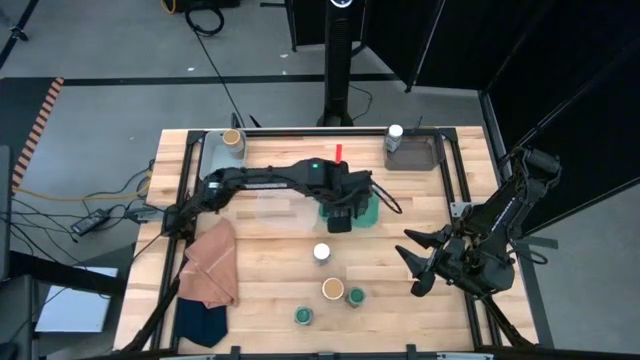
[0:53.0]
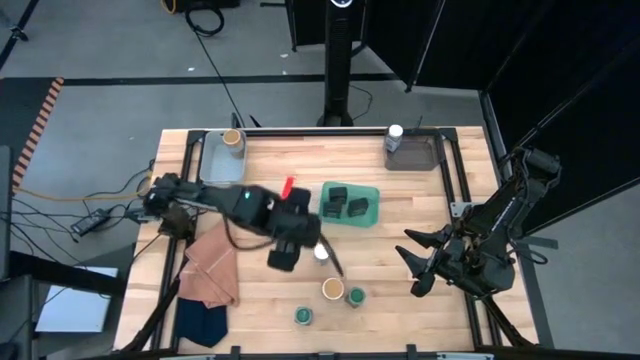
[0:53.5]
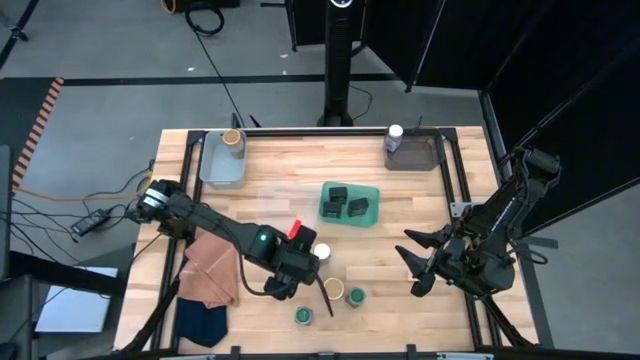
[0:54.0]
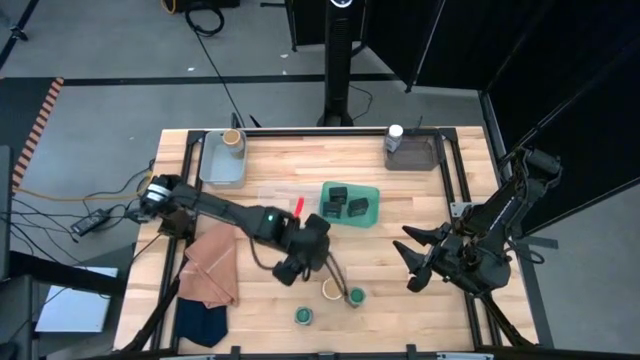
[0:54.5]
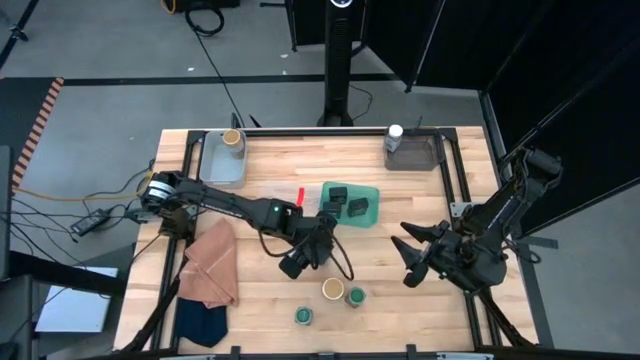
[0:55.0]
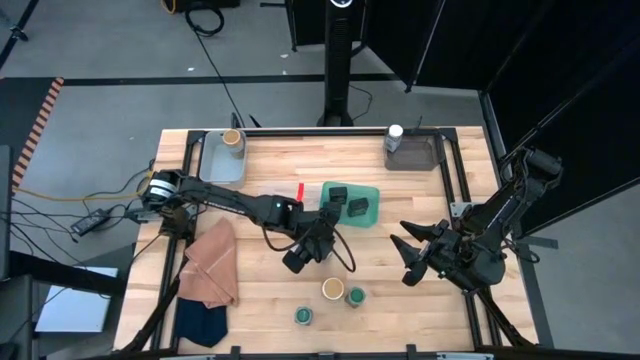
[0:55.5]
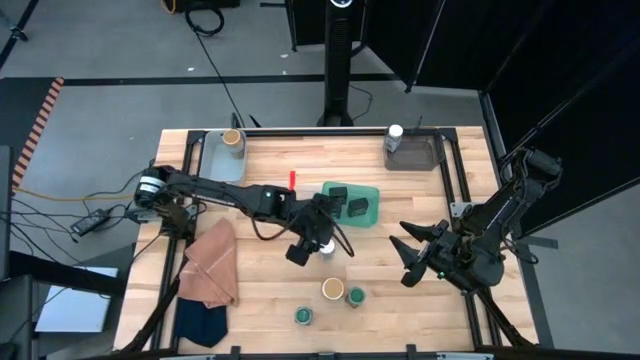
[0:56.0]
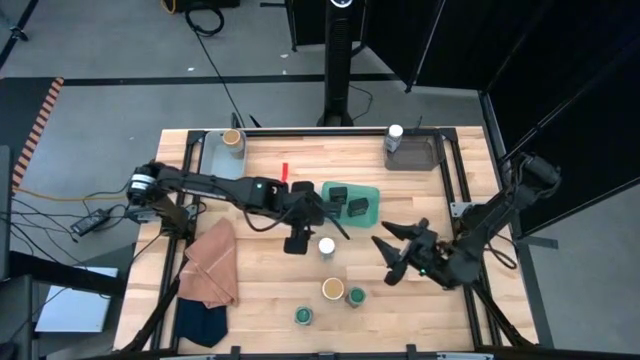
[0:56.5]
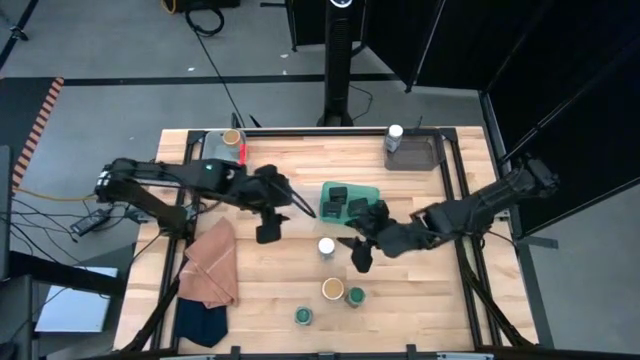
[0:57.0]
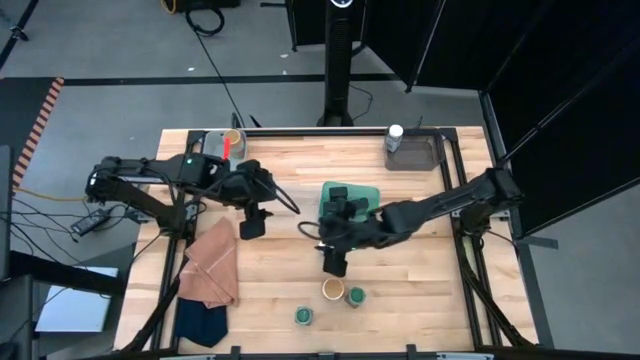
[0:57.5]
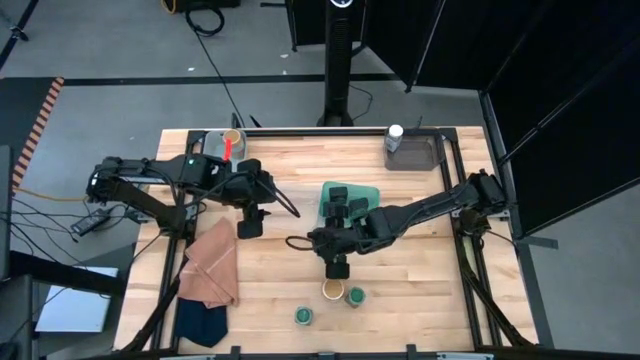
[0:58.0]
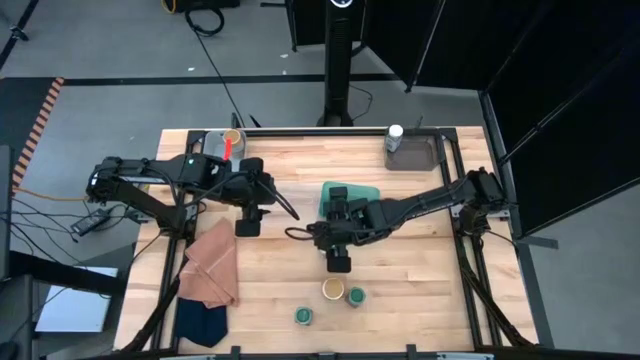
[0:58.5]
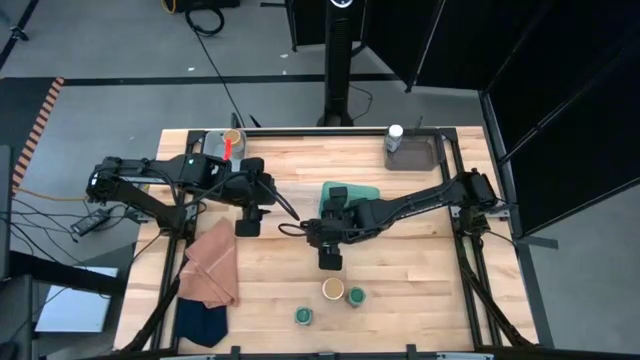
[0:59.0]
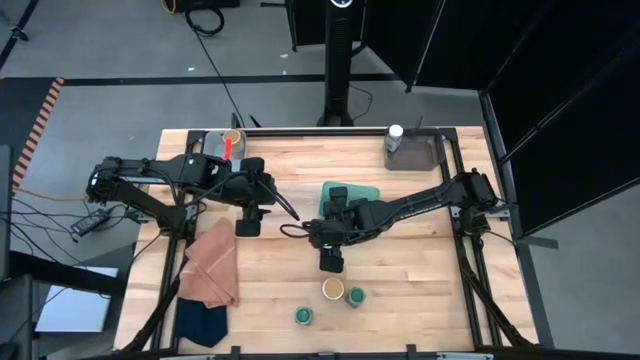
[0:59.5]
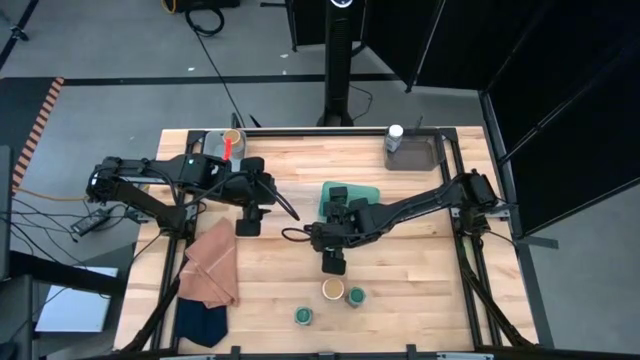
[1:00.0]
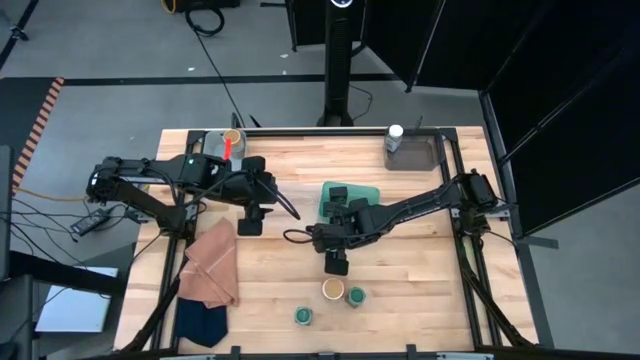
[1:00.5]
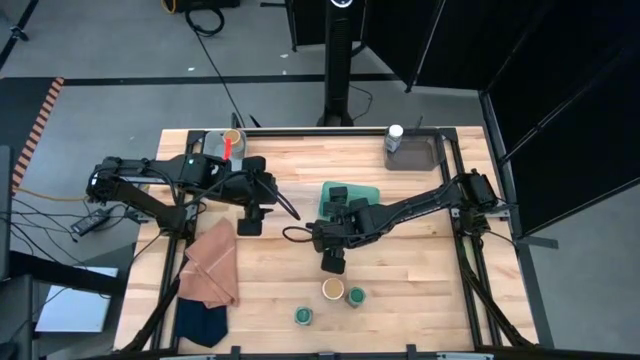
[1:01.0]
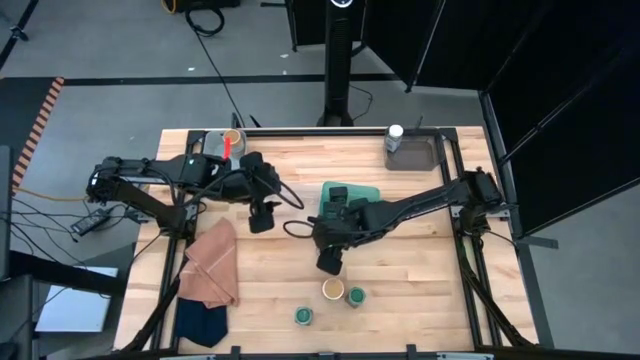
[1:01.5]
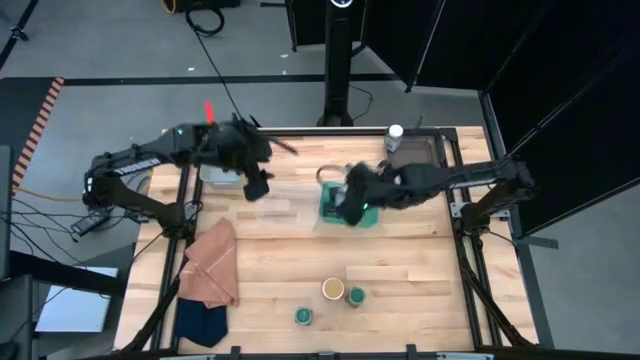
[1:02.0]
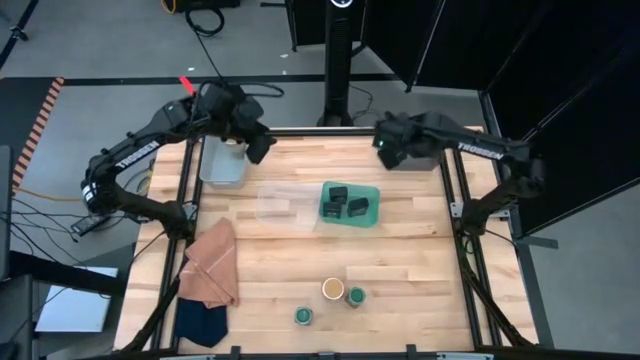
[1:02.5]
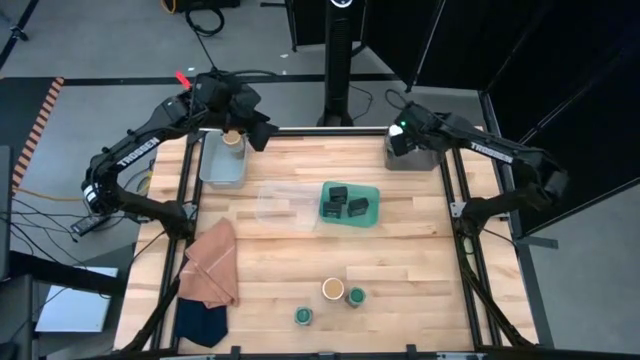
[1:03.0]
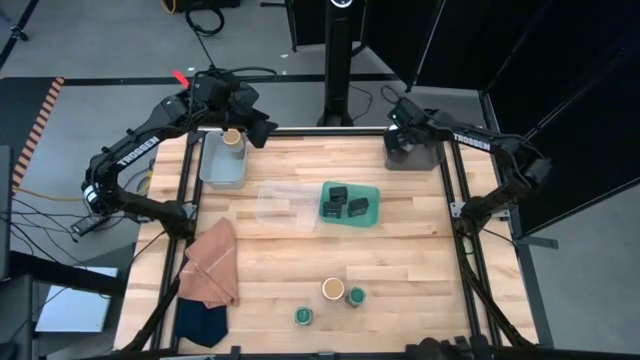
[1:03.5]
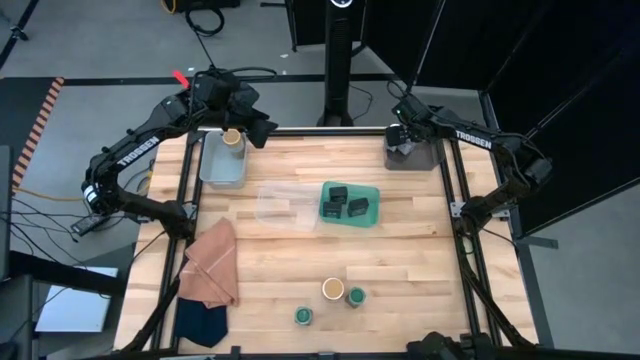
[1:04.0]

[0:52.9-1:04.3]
Task: Sort spices by type
Put the white seasoning bottle into the black bin

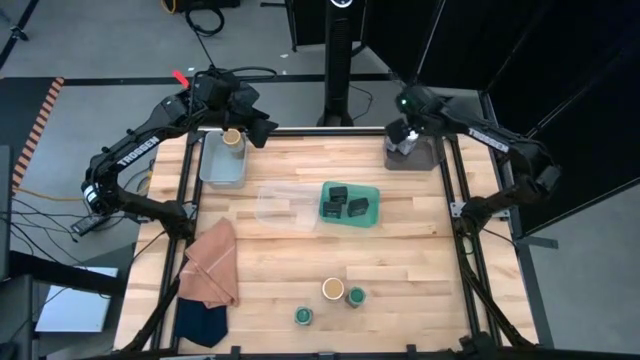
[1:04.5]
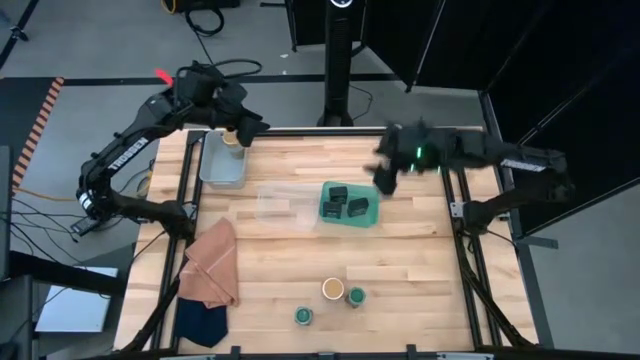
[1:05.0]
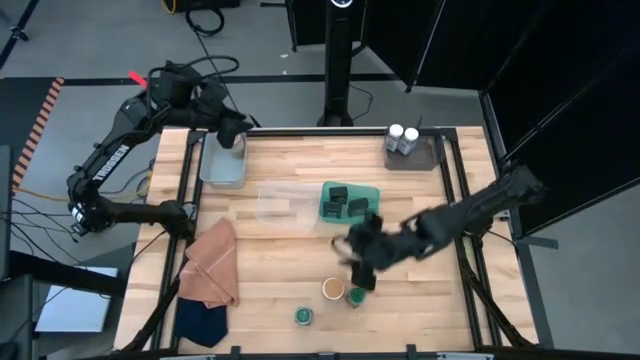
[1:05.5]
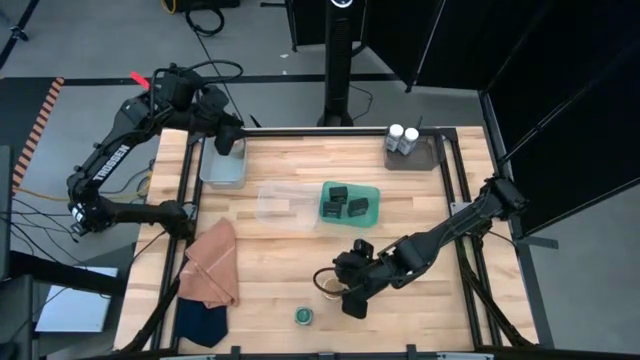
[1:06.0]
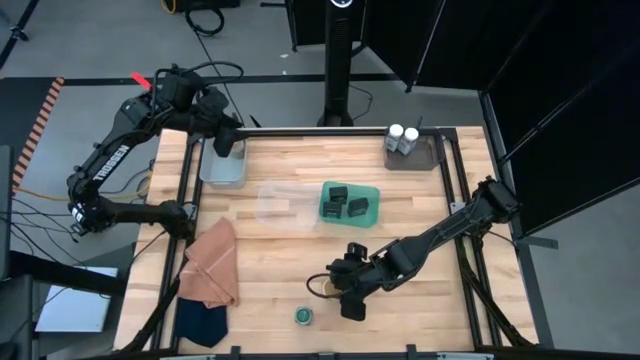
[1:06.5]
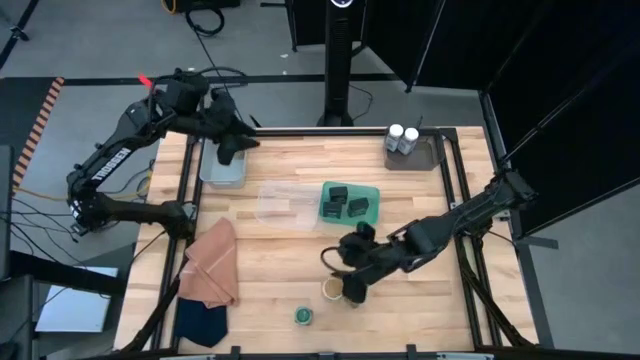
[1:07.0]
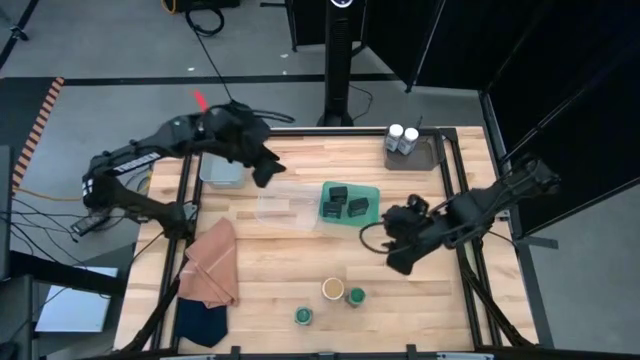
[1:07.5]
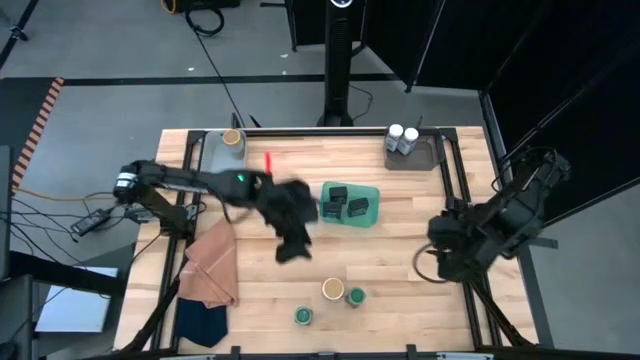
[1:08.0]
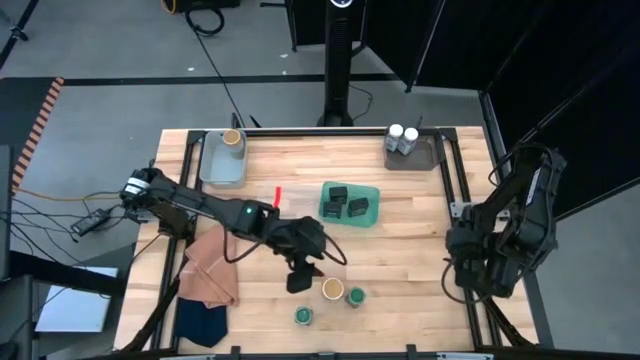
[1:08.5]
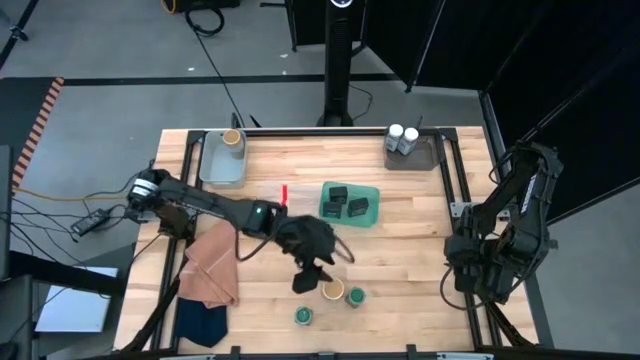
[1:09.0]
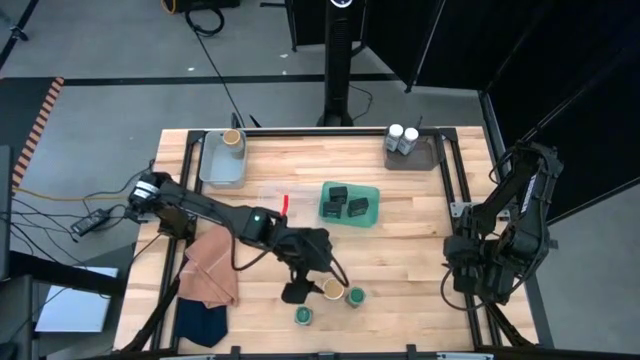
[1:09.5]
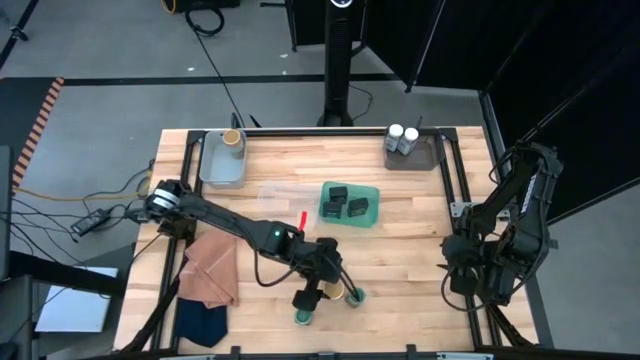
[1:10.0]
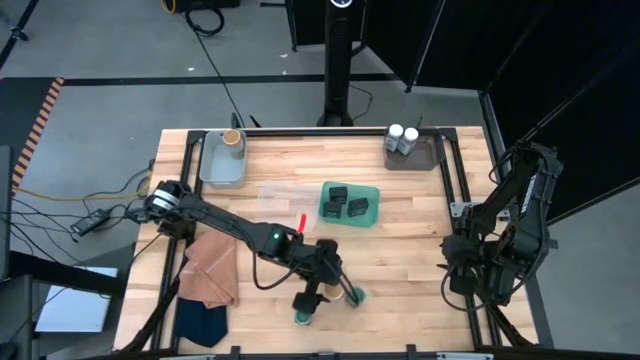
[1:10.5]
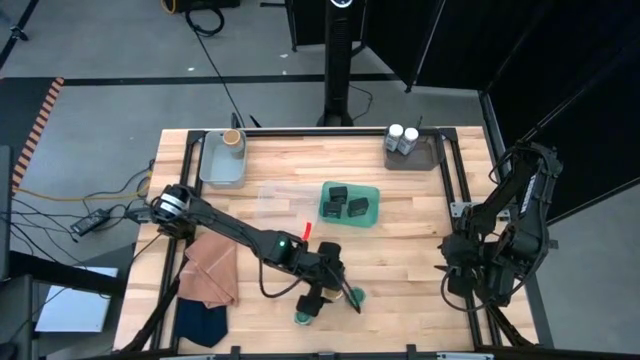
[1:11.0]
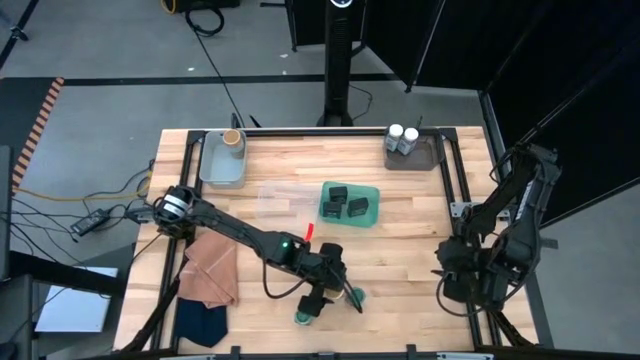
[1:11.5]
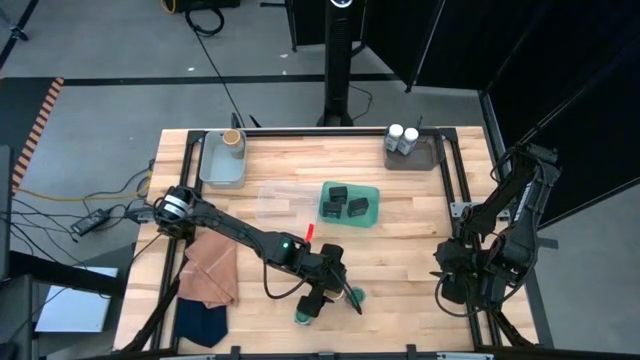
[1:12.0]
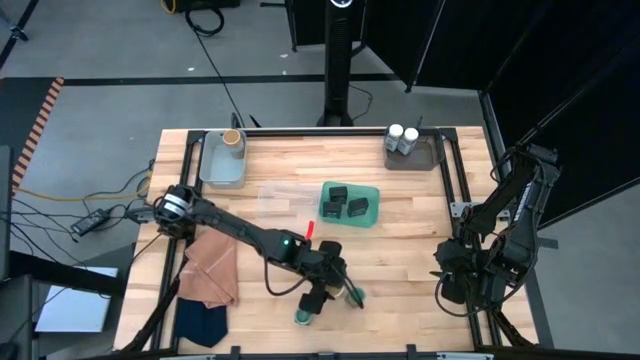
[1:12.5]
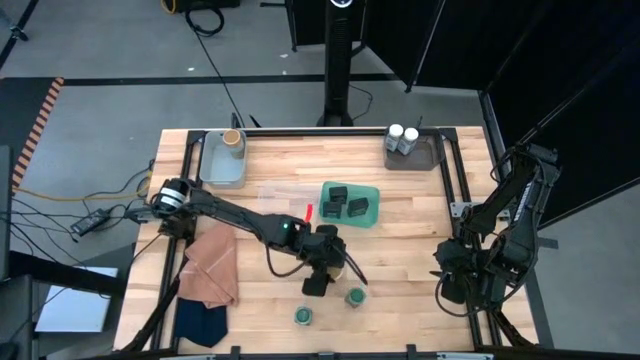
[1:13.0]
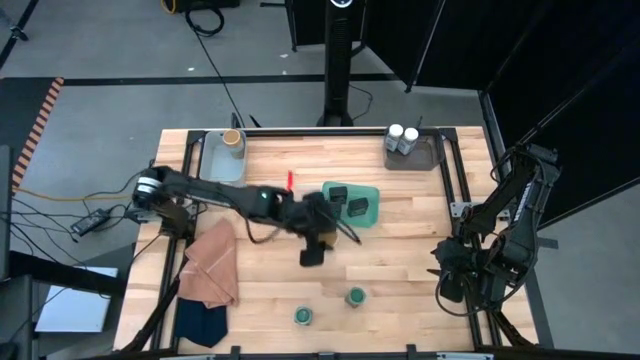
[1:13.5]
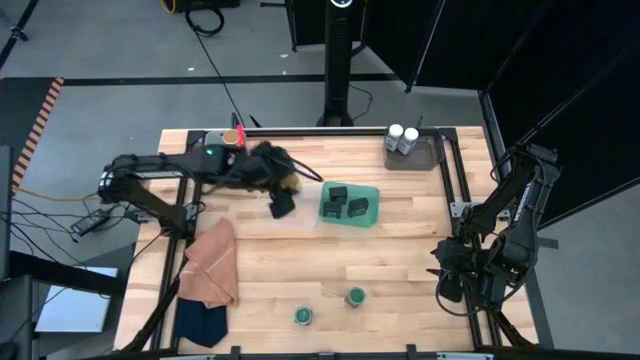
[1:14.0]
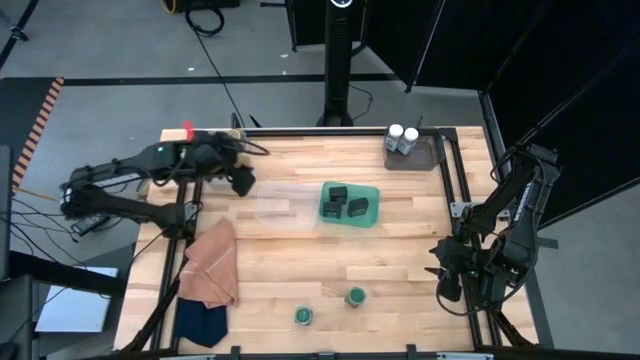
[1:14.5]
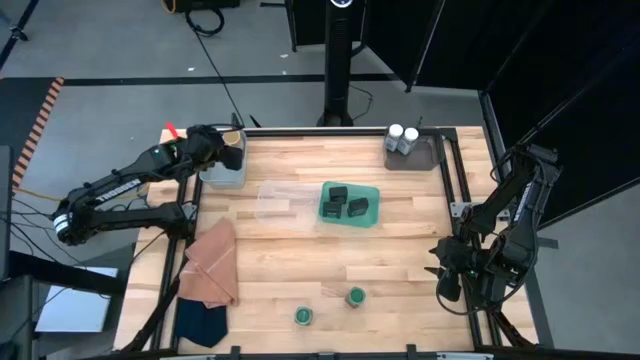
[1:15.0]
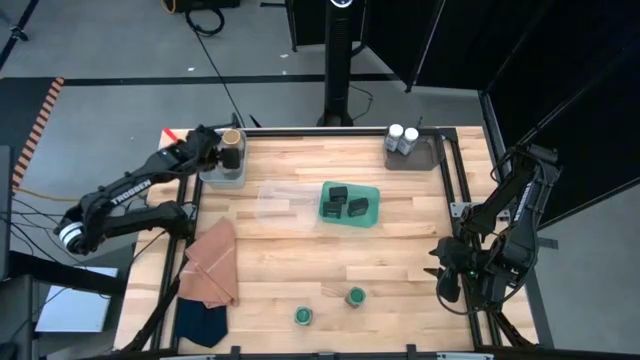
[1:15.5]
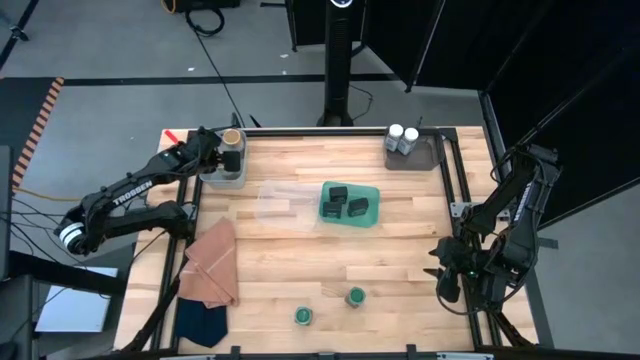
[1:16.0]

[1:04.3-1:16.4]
Put the brown seasoning bottle into the gray bin
